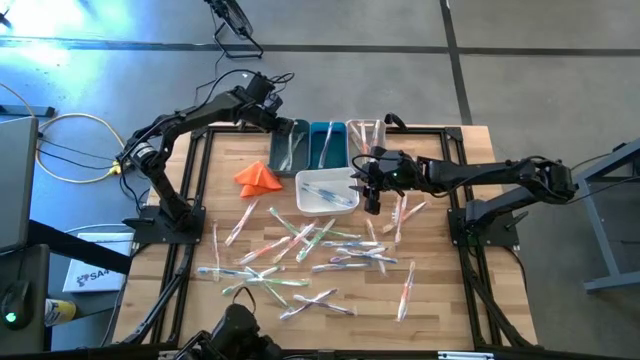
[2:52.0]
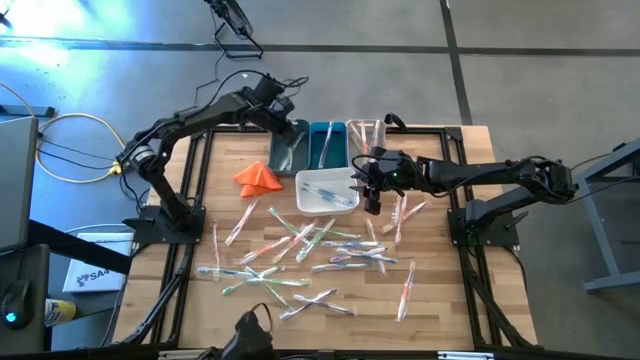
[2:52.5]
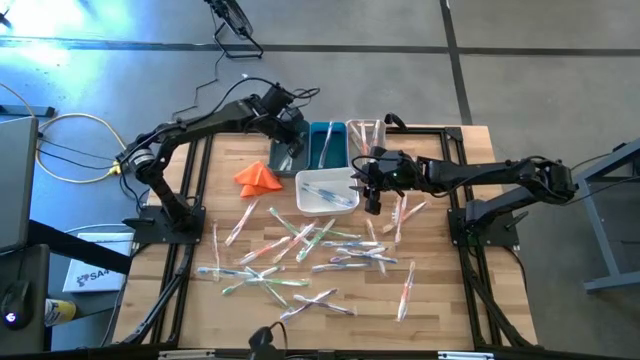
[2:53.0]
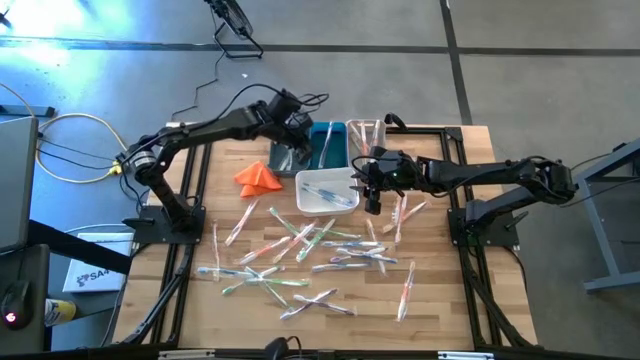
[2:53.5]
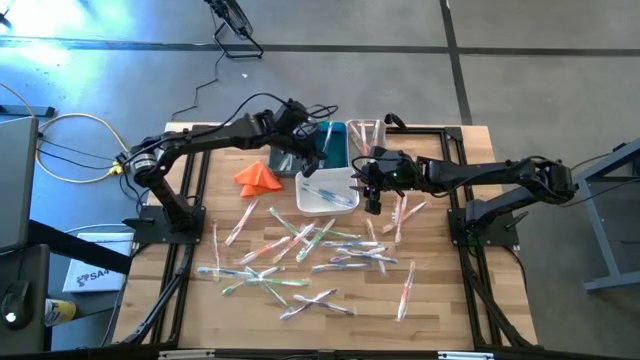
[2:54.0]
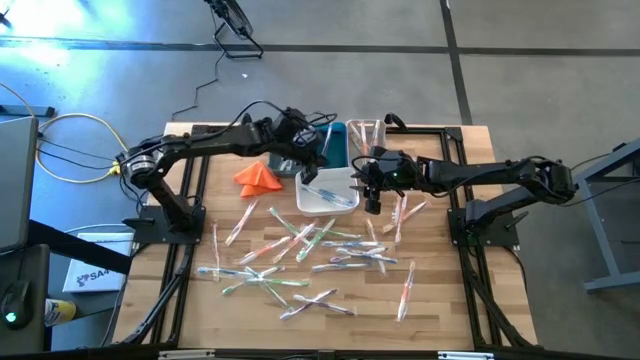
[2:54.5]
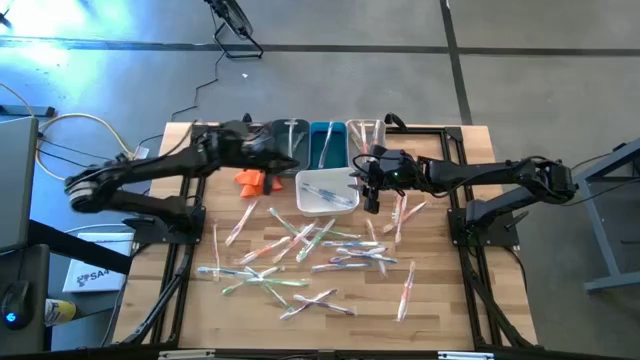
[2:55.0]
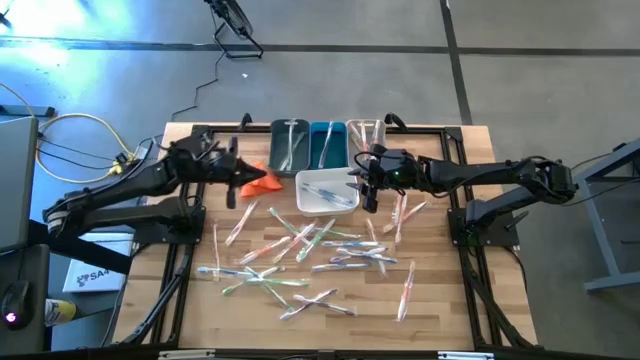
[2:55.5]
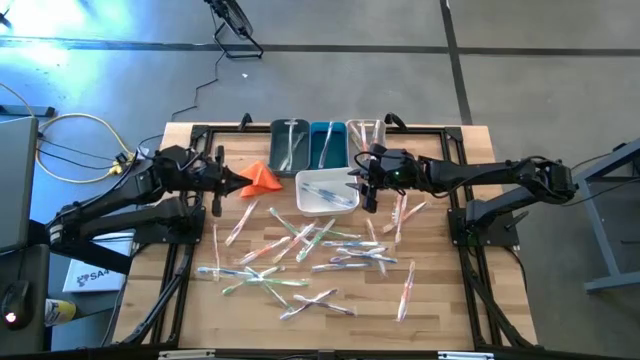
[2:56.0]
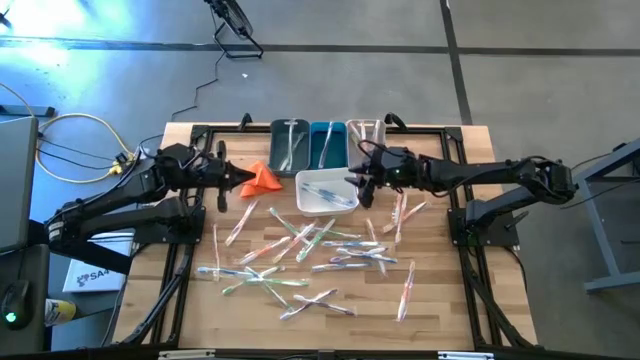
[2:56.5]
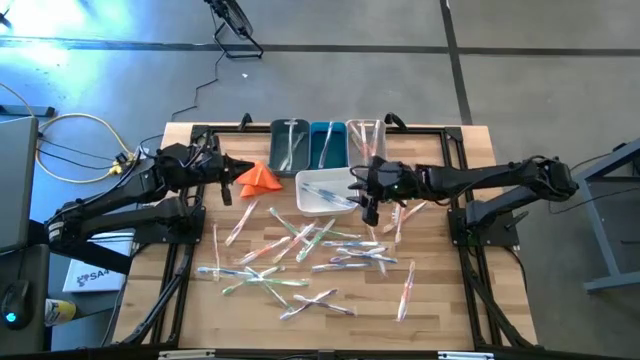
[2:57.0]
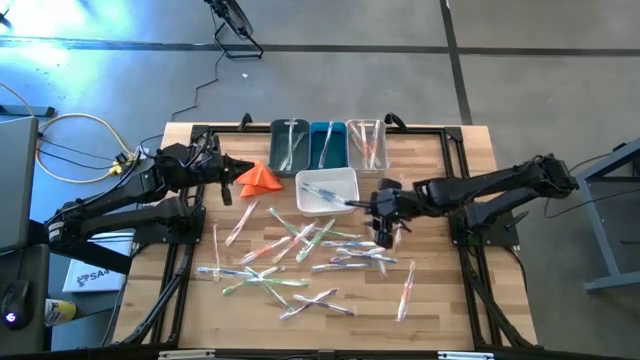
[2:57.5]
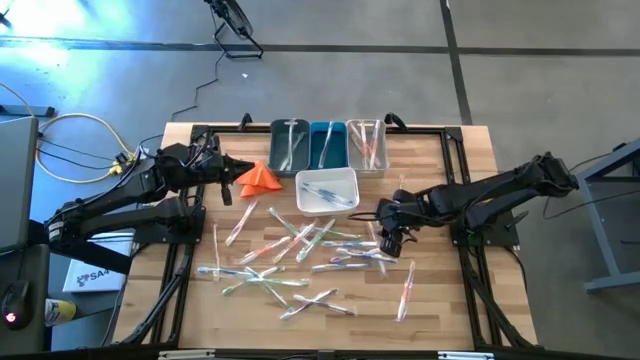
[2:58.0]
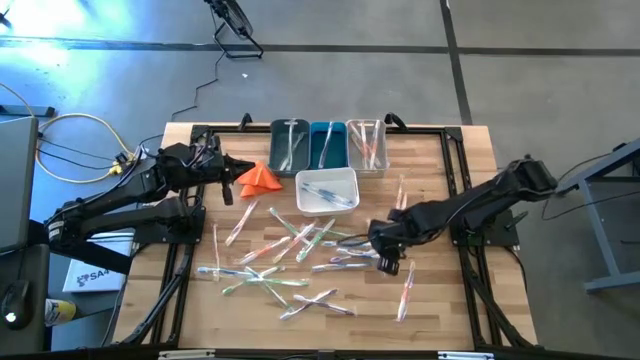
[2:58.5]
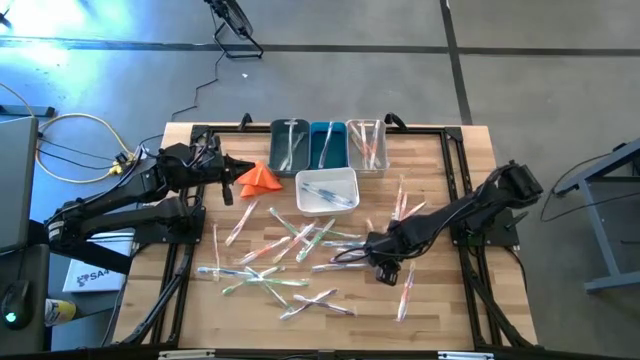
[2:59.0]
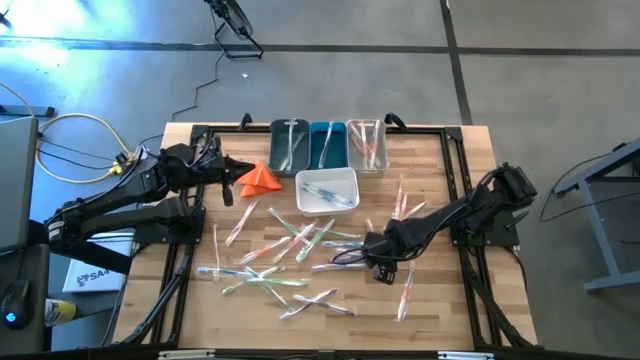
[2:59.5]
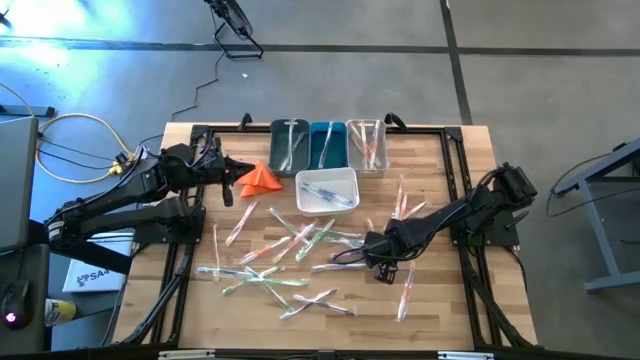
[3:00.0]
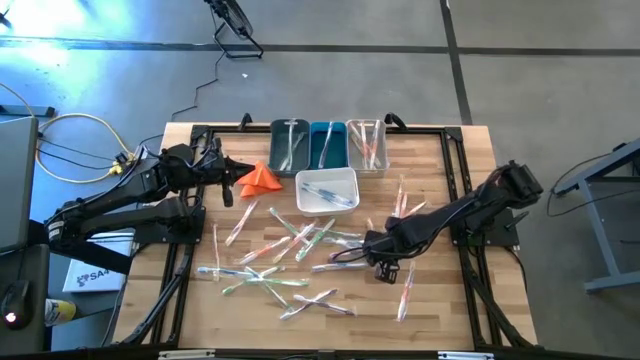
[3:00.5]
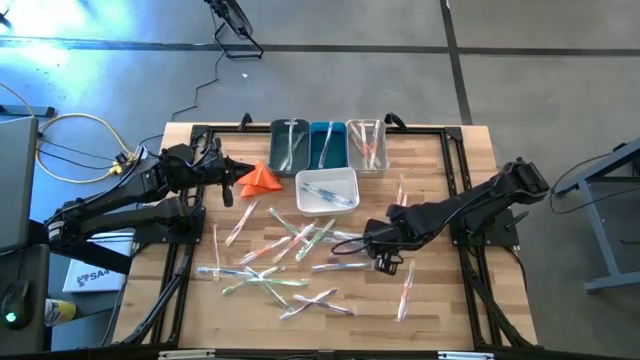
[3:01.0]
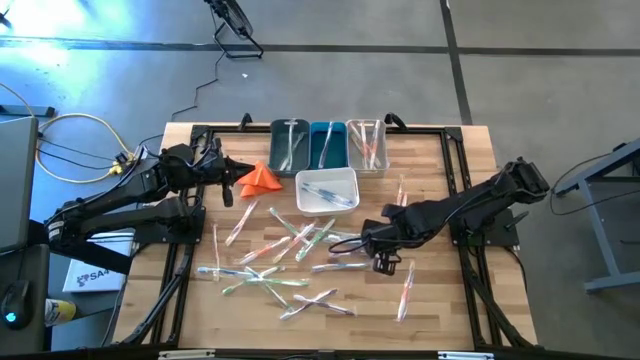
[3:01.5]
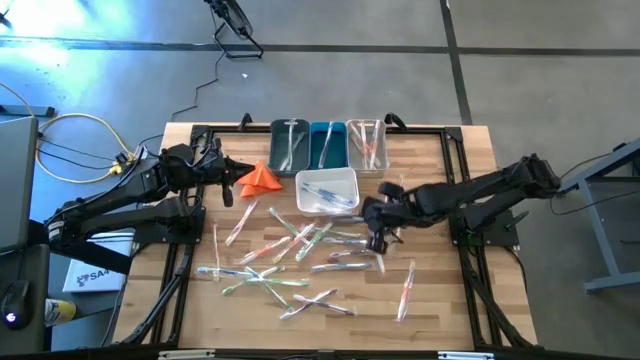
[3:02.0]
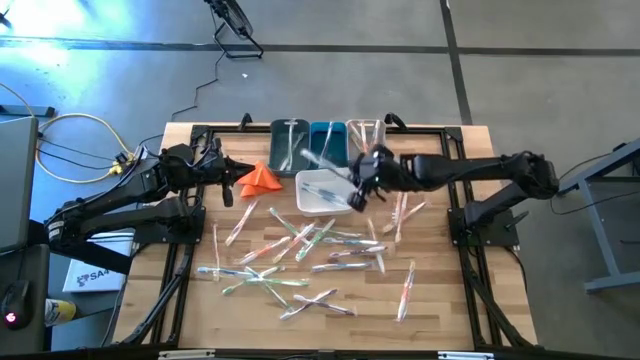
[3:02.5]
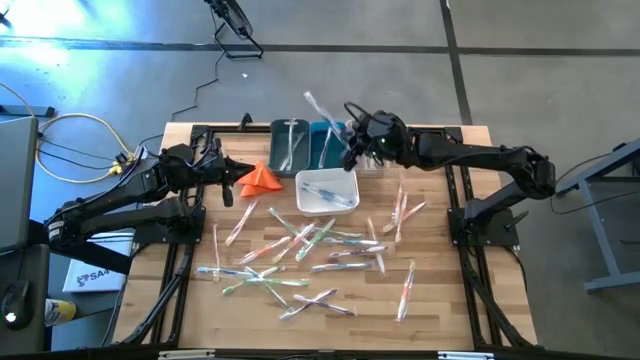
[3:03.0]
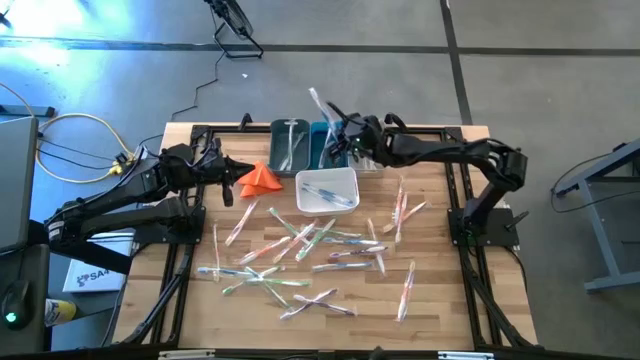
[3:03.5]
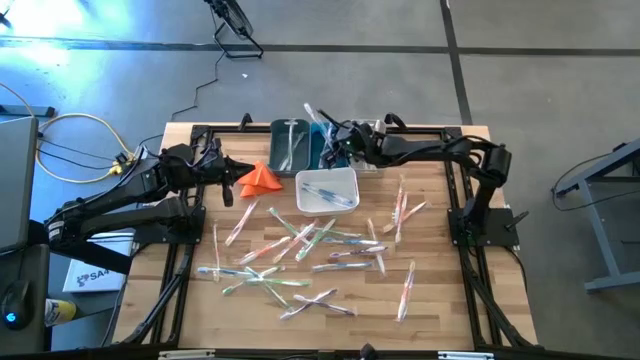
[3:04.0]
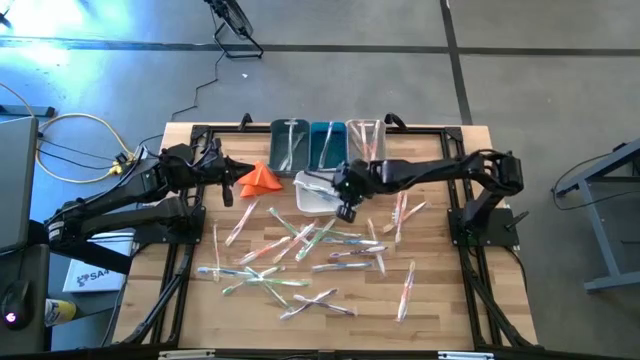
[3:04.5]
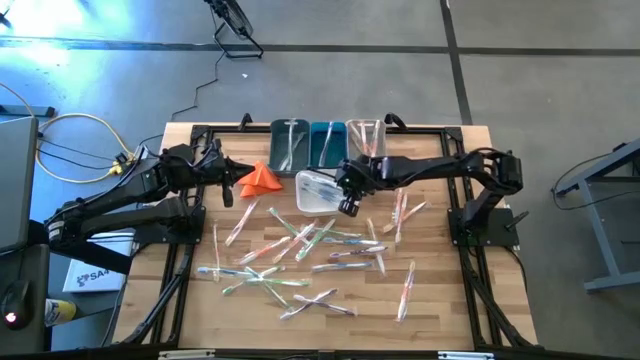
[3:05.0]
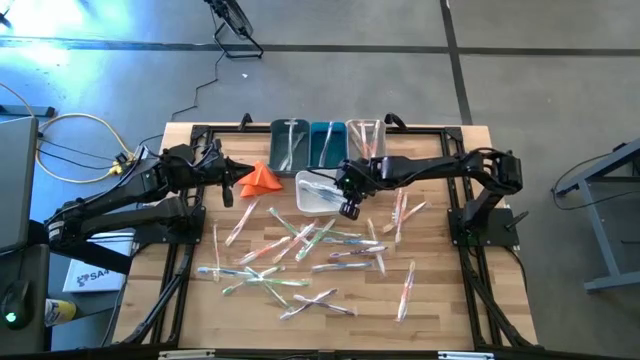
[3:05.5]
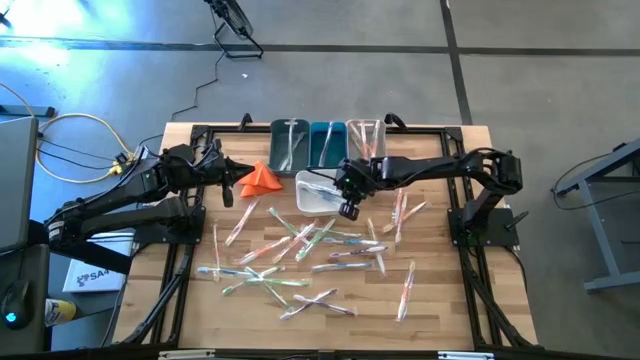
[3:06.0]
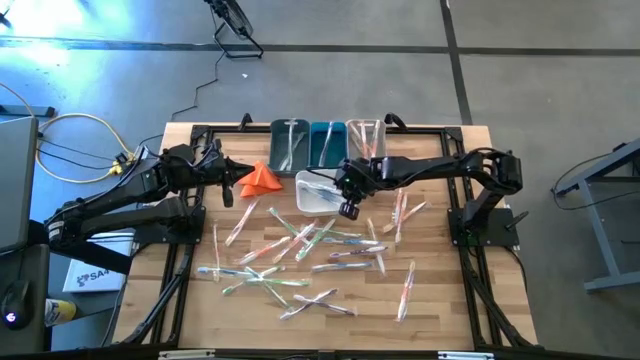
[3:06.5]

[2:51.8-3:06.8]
Task: Pick & Place Toothbrushes
Put the blue toothbrush into the white bin

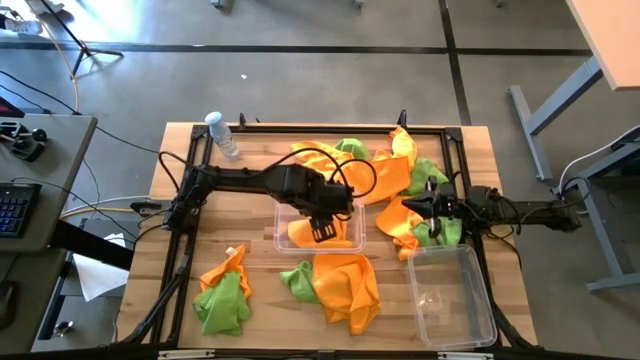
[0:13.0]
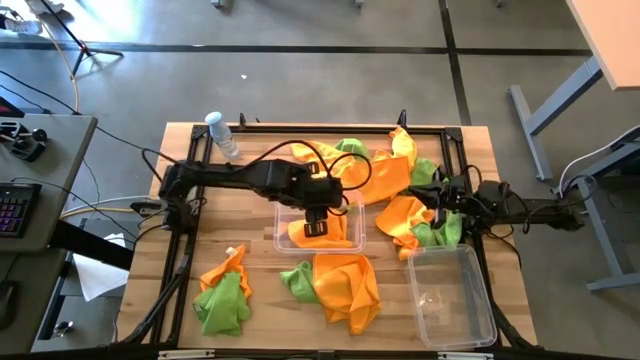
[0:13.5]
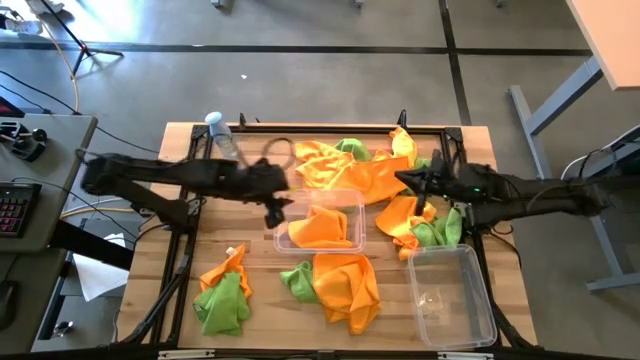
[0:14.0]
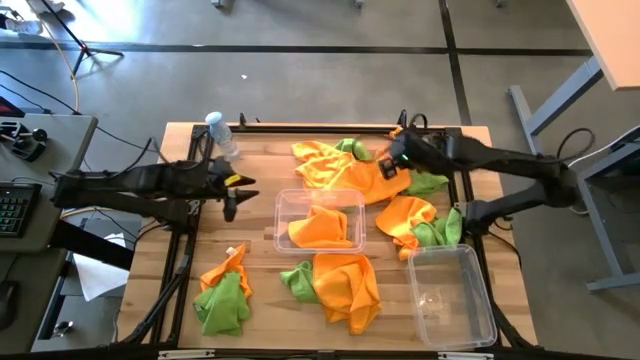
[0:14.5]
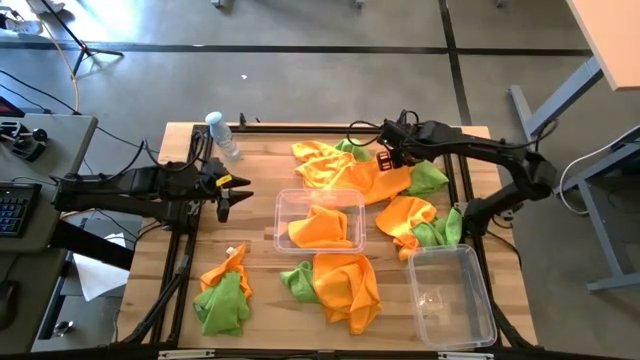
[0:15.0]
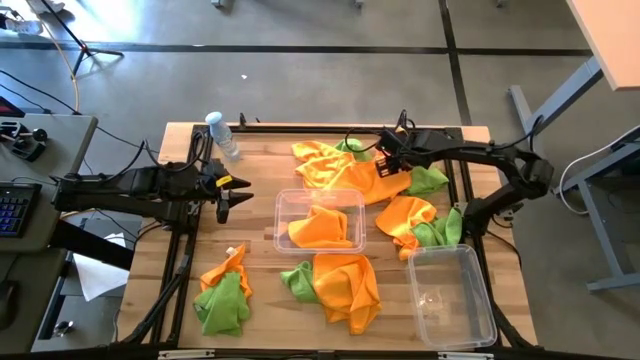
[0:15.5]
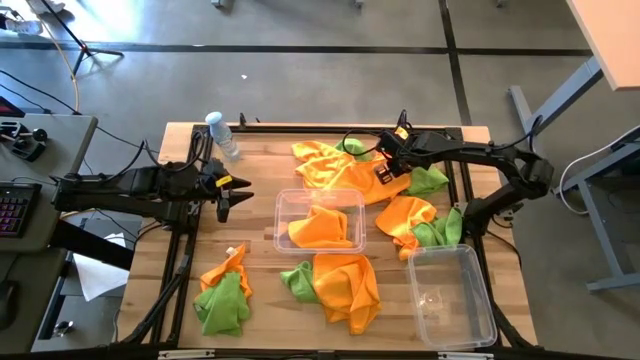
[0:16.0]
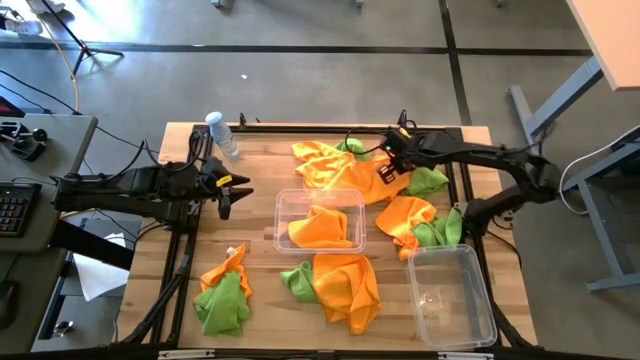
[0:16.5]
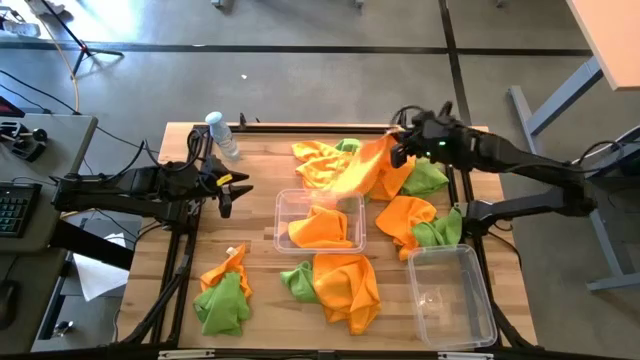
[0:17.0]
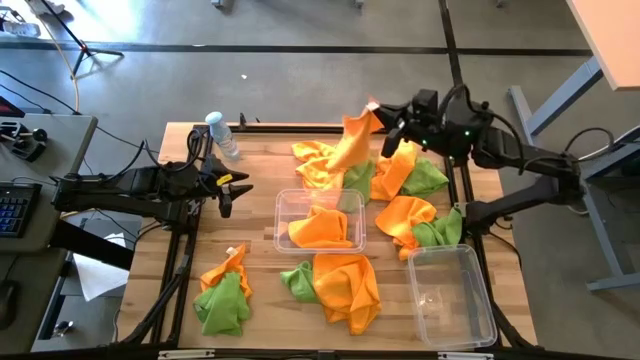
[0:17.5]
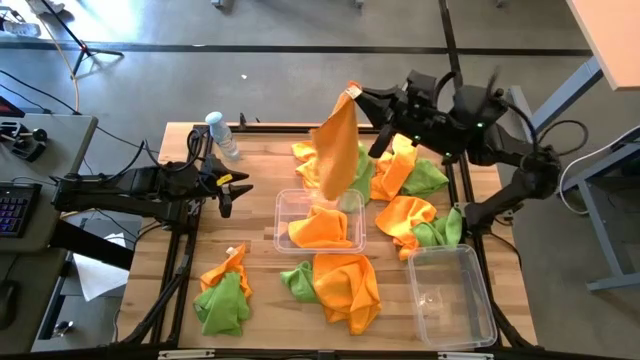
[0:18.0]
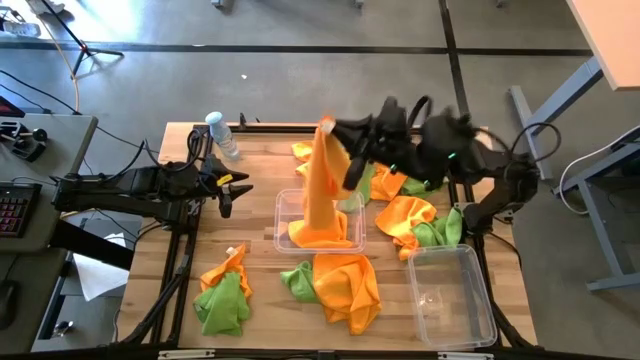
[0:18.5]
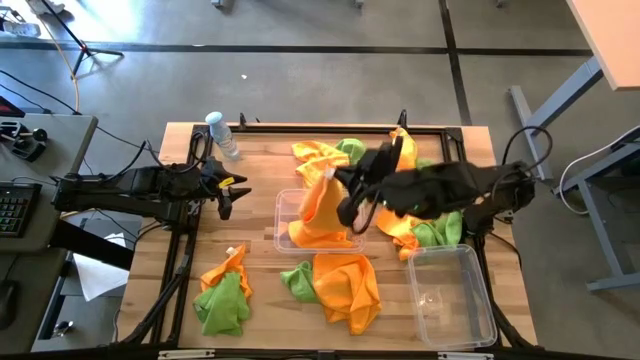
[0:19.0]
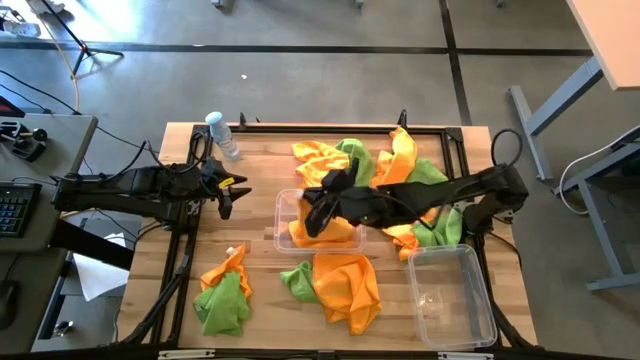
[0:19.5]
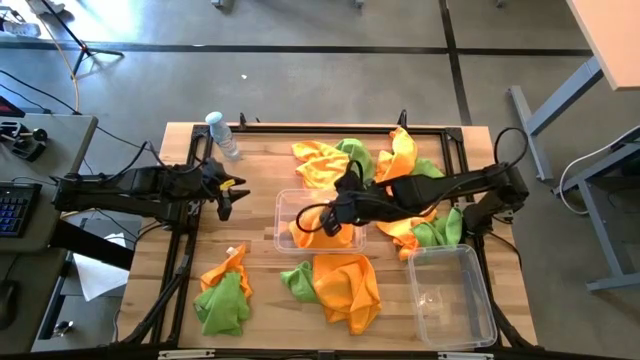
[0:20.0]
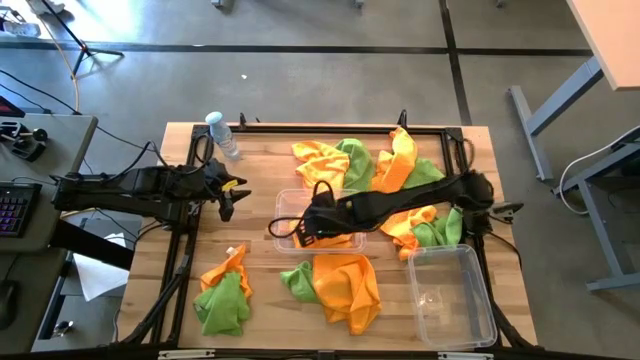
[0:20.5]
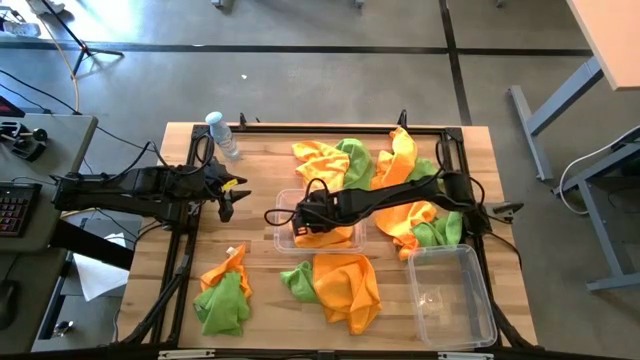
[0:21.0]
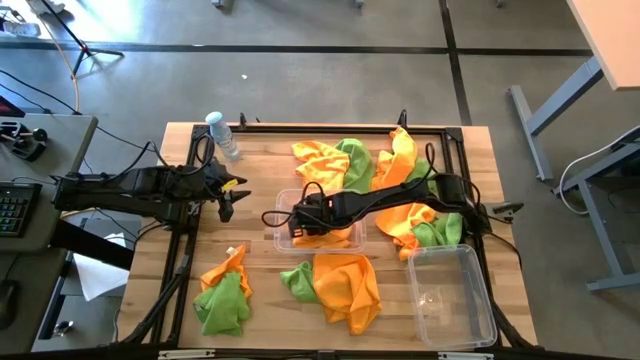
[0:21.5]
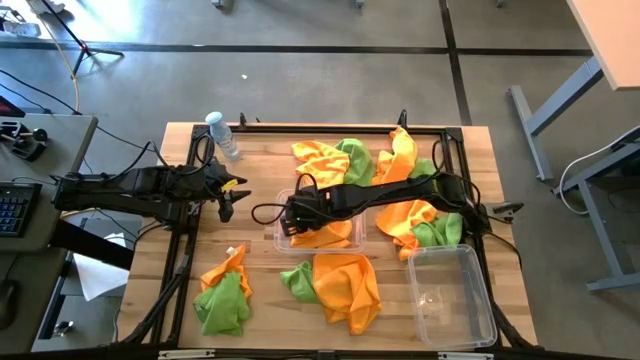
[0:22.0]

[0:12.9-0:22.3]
Task: Sort microfiber towel by color & place in baskets
Put the orange towel into the top transparent bin
